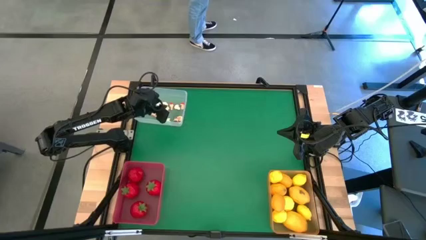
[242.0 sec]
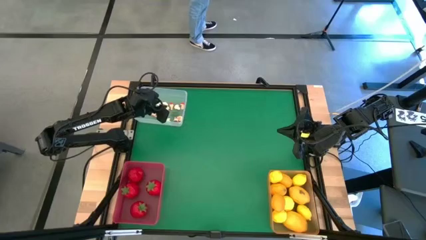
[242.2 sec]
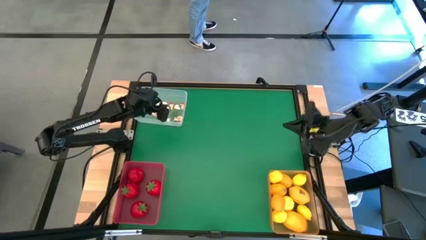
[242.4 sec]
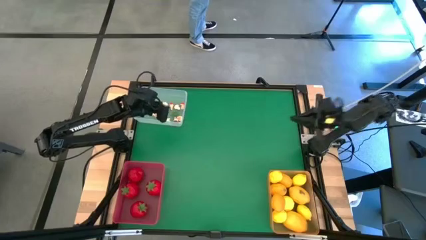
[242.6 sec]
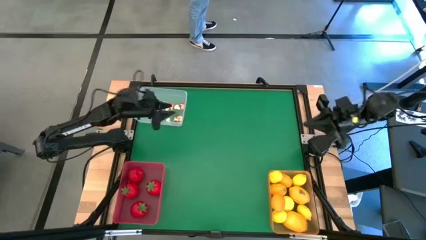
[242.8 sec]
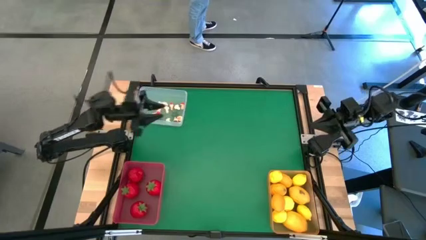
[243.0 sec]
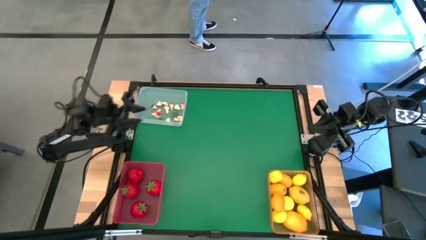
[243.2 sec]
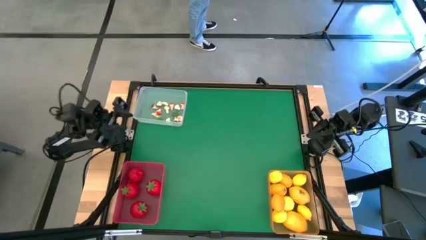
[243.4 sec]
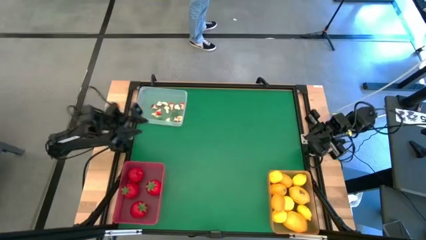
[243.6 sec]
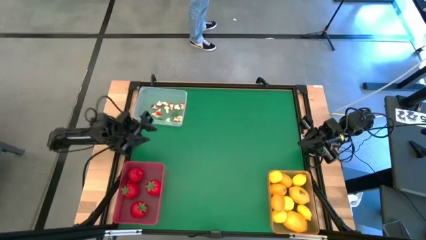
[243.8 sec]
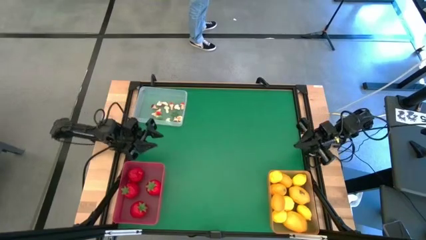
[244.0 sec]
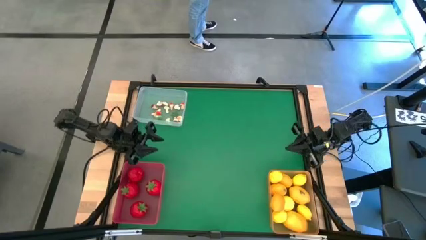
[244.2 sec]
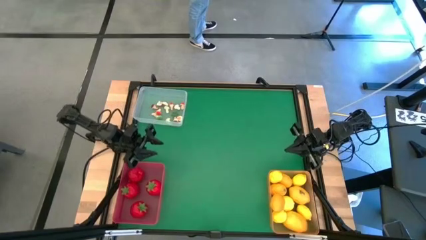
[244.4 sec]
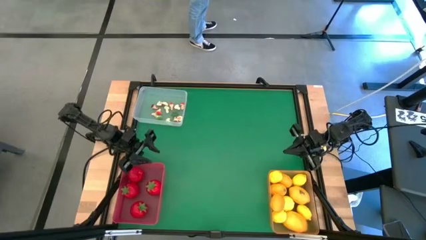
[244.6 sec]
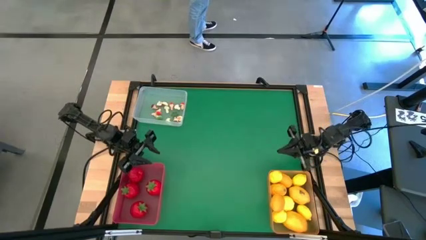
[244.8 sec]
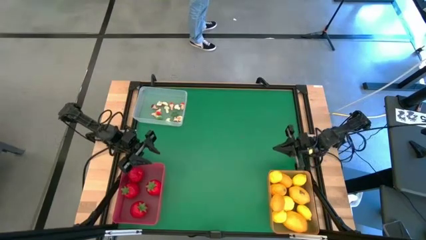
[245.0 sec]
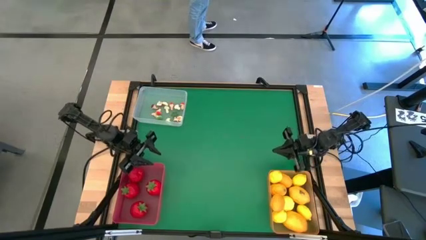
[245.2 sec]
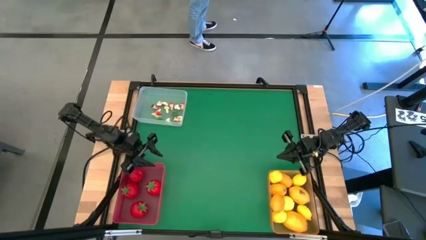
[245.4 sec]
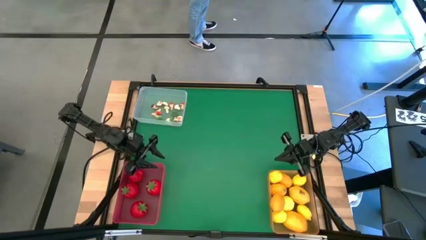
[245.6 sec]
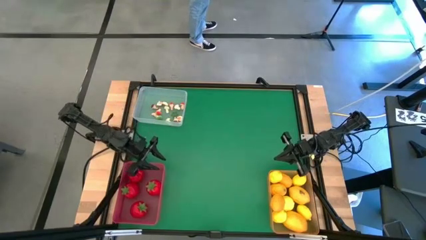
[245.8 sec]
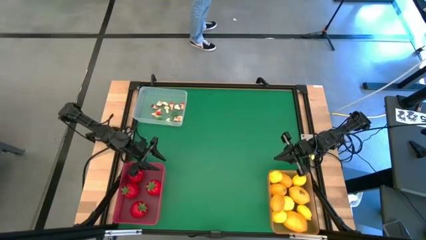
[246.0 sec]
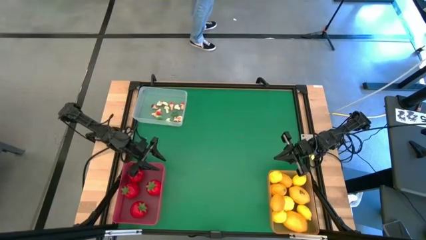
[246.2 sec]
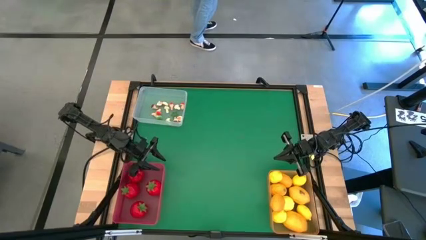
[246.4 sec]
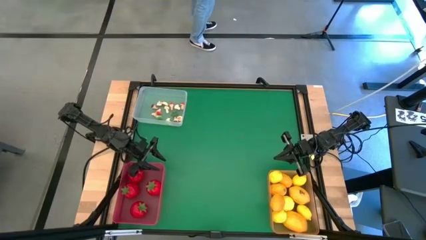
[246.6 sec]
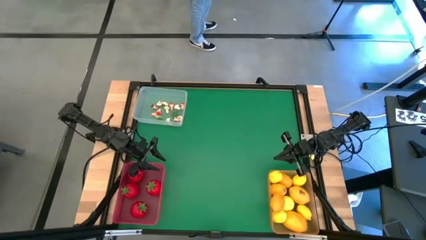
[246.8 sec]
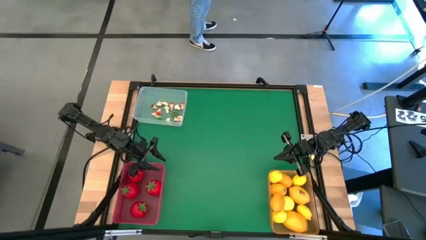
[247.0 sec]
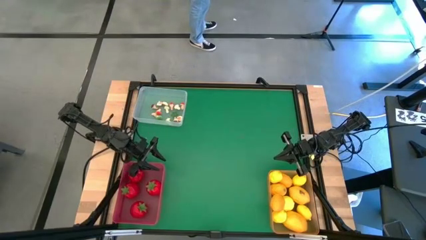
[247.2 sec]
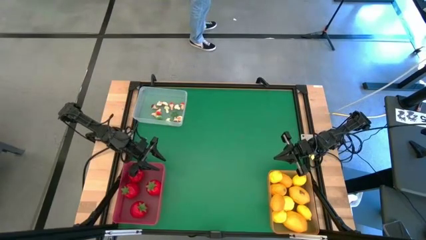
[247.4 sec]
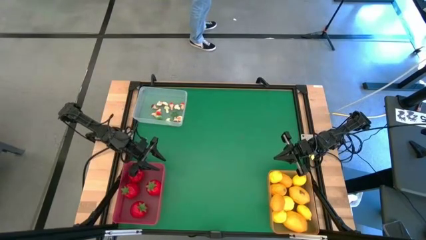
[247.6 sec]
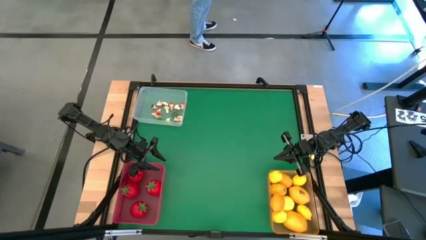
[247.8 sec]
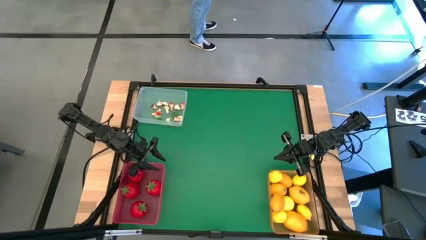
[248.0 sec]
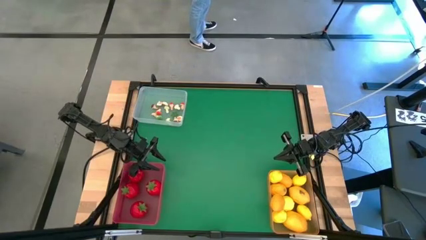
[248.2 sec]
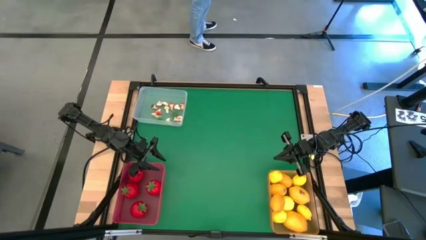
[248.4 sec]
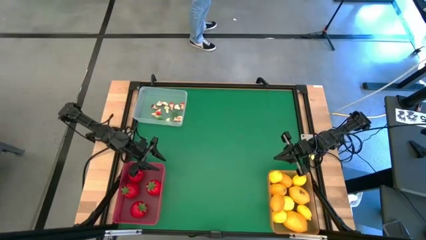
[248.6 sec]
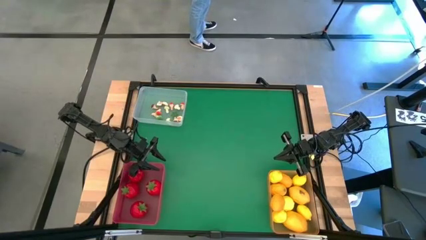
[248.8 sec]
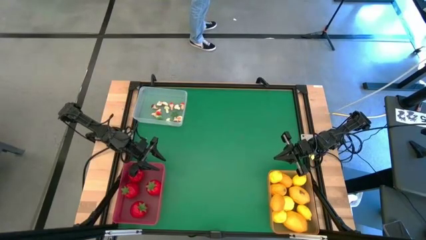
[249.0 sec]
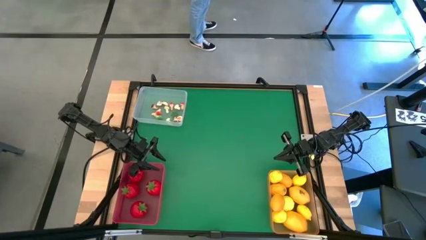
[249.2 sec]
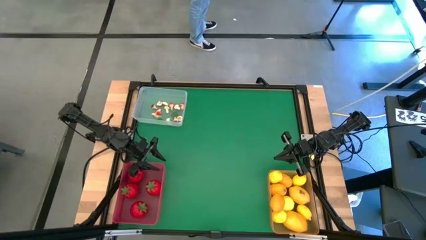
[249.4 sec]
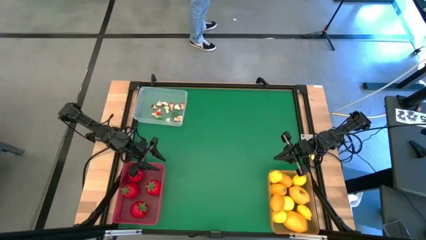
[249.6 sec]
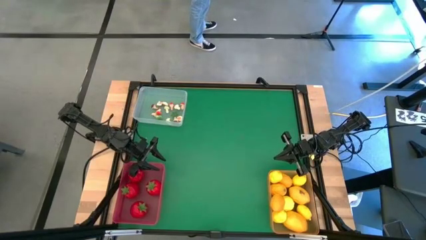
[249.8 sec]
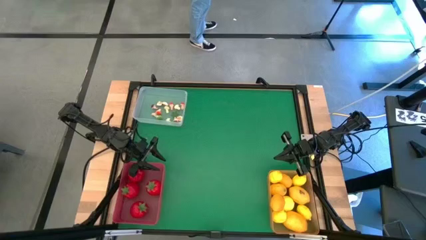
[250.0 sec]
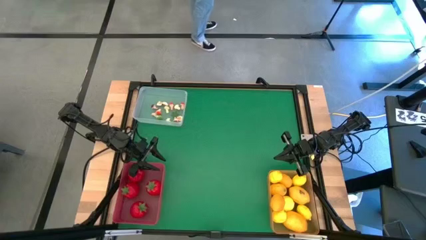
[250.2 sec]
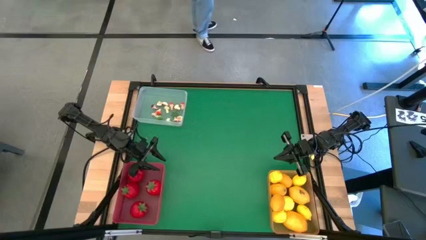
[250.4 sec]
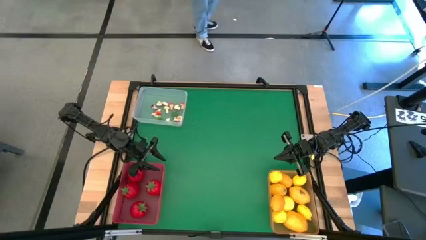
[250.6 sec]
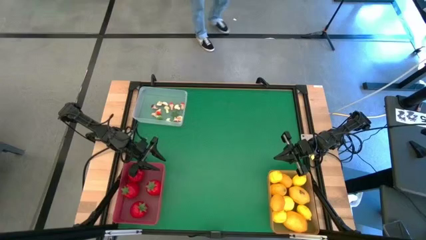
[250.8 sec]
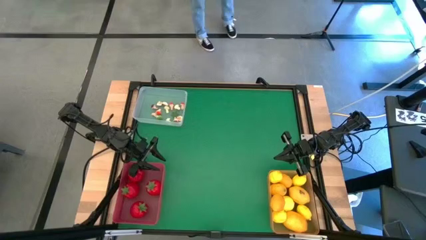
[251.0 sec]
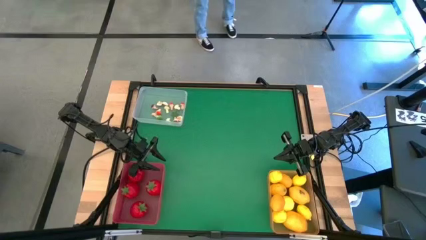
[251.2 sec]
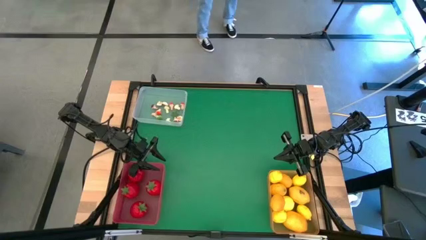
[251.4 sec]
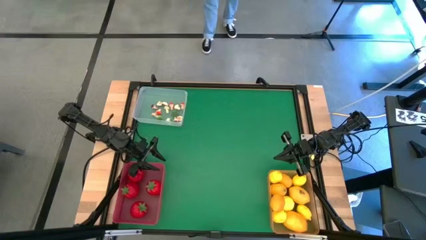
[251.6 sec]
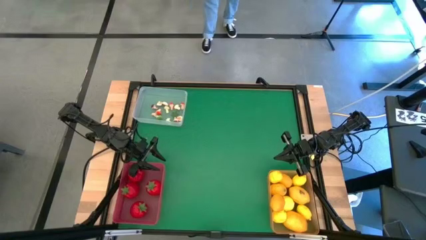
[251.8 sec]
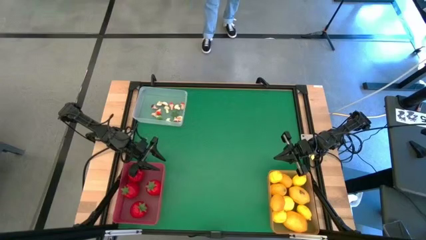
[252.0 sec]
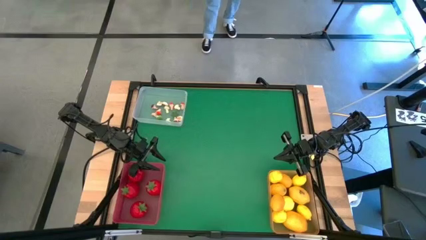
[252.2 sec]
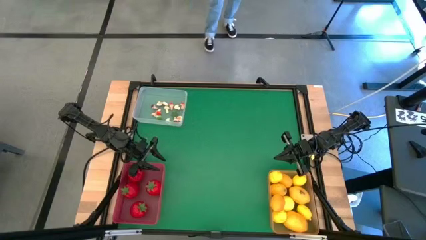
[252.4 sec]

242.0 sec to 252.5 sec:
Task: Sort produce into baskets
Return to Home Position
